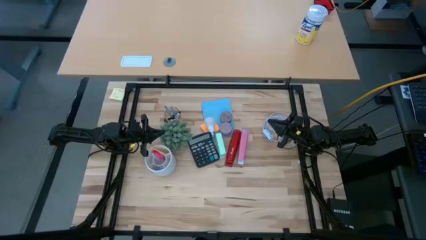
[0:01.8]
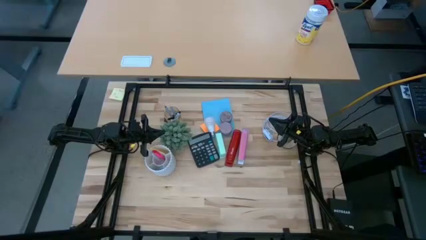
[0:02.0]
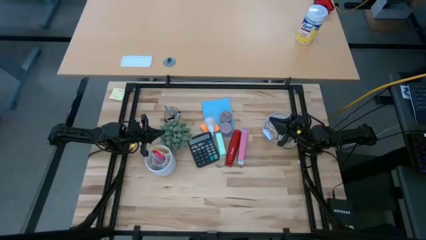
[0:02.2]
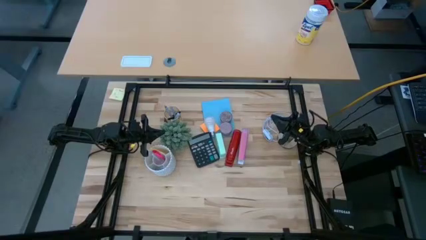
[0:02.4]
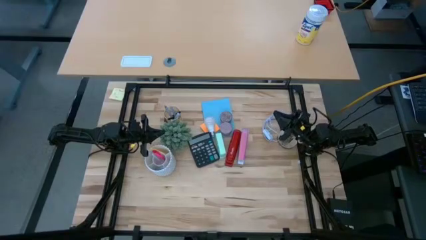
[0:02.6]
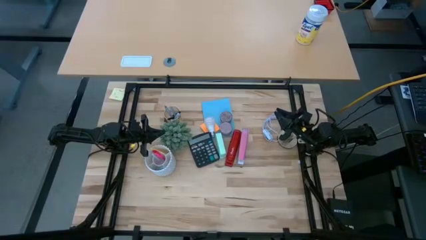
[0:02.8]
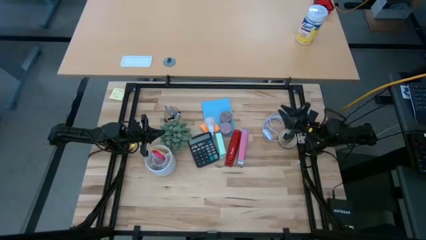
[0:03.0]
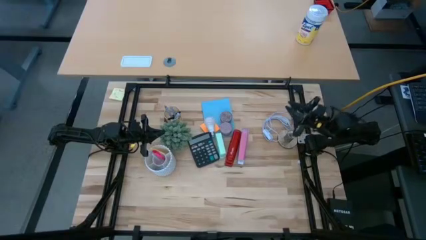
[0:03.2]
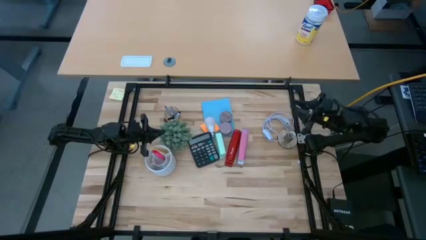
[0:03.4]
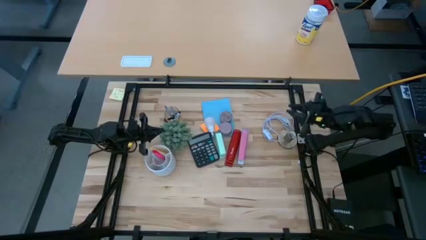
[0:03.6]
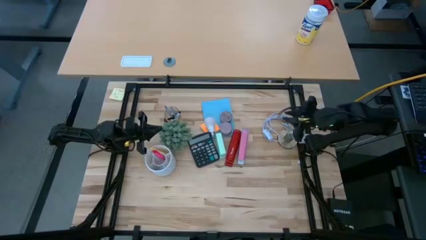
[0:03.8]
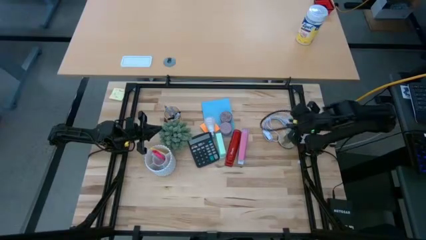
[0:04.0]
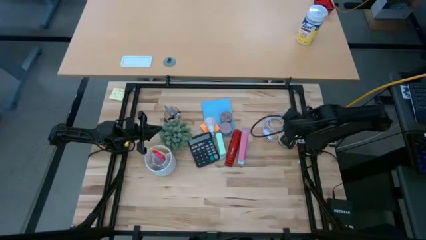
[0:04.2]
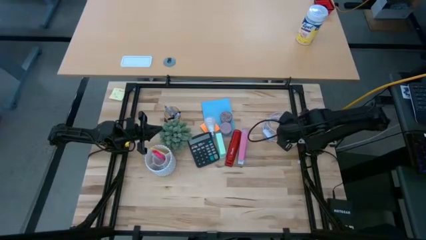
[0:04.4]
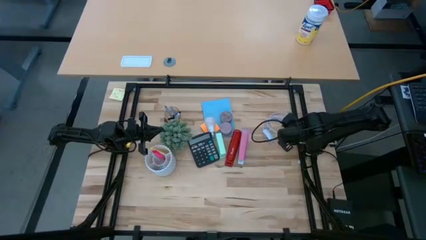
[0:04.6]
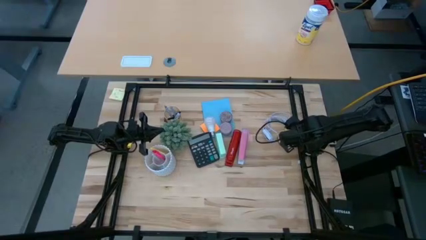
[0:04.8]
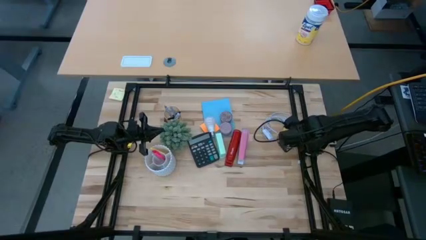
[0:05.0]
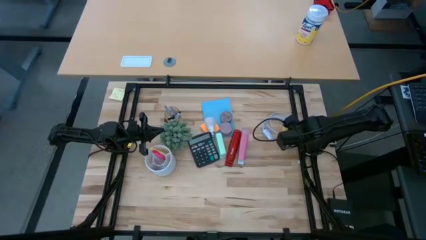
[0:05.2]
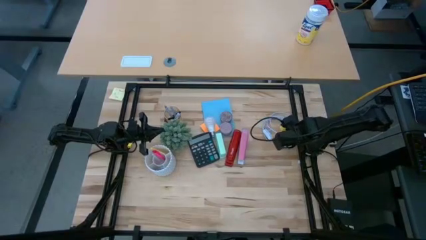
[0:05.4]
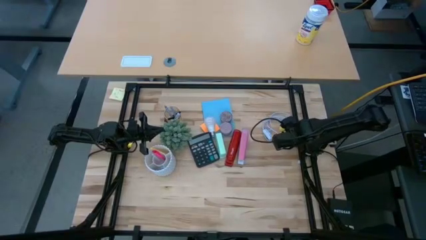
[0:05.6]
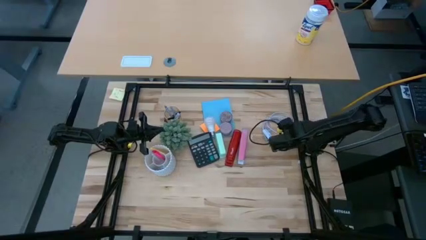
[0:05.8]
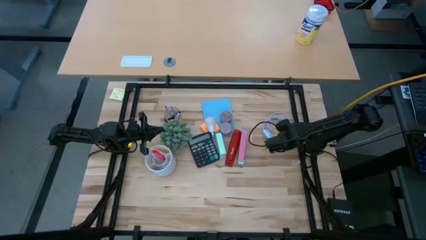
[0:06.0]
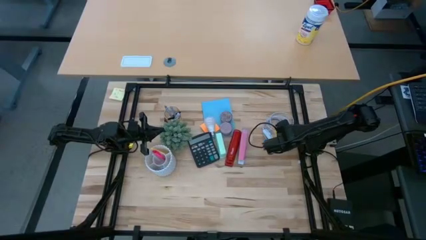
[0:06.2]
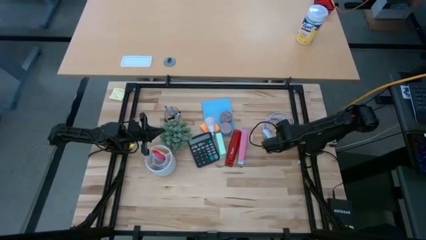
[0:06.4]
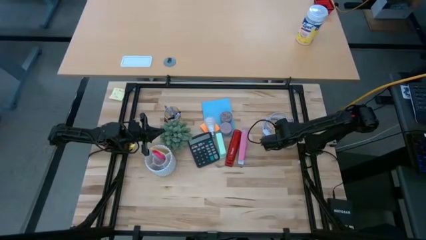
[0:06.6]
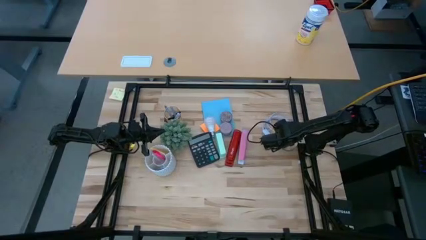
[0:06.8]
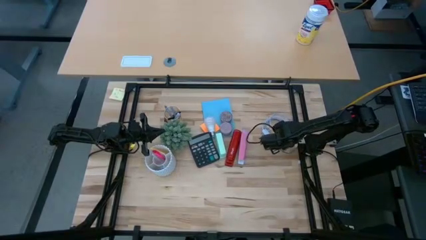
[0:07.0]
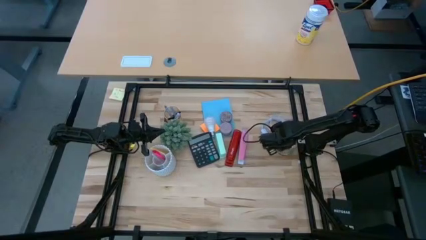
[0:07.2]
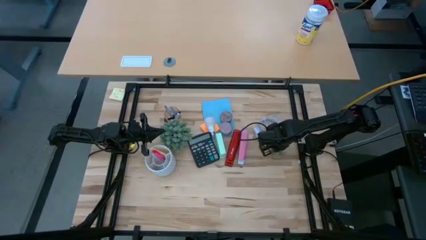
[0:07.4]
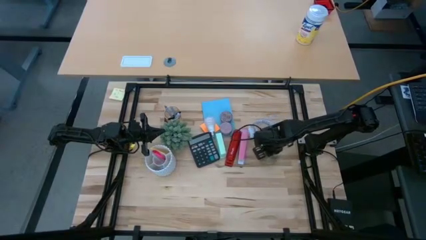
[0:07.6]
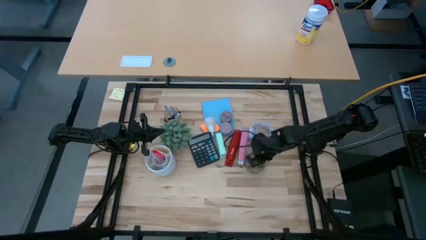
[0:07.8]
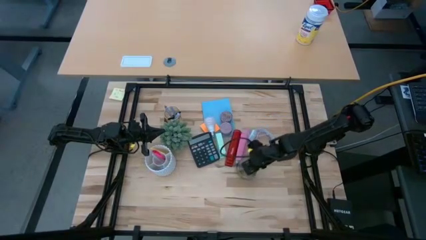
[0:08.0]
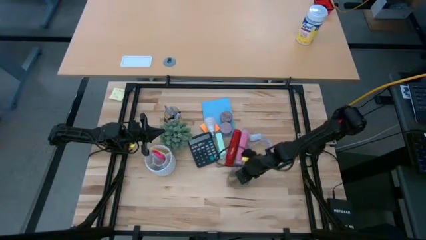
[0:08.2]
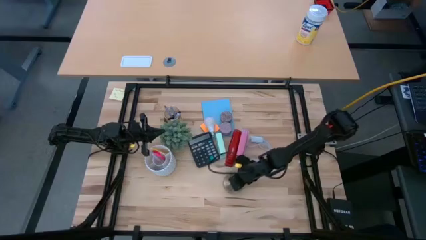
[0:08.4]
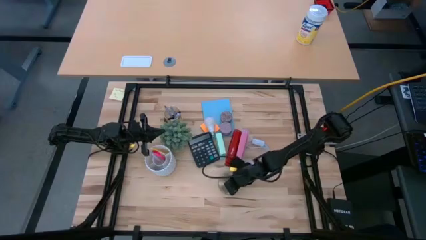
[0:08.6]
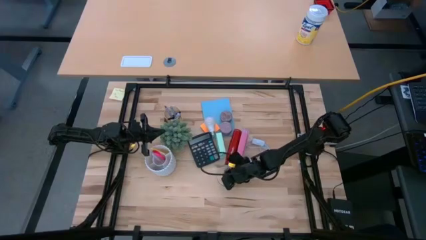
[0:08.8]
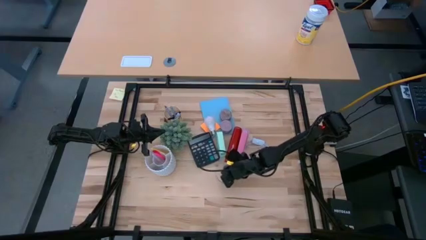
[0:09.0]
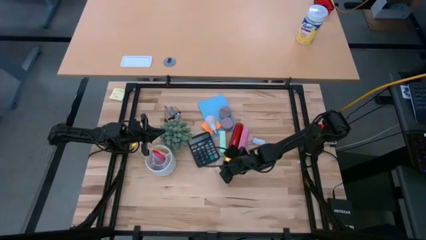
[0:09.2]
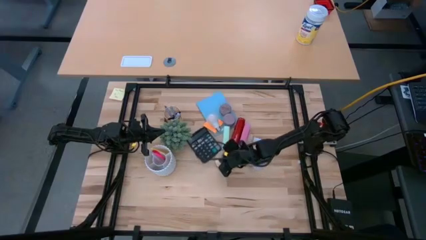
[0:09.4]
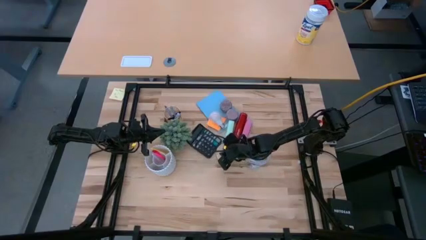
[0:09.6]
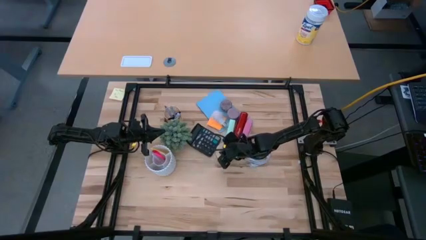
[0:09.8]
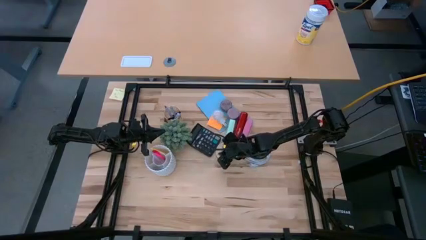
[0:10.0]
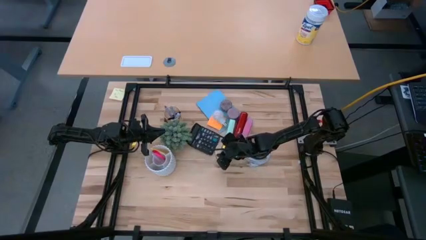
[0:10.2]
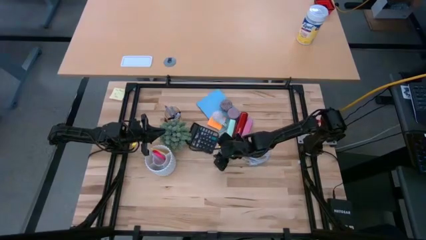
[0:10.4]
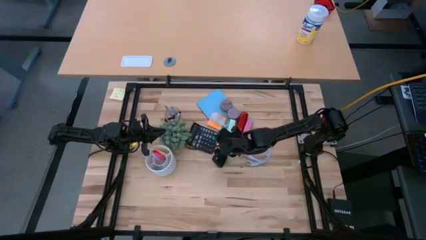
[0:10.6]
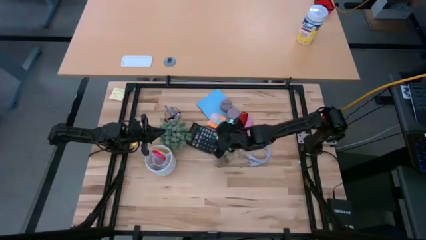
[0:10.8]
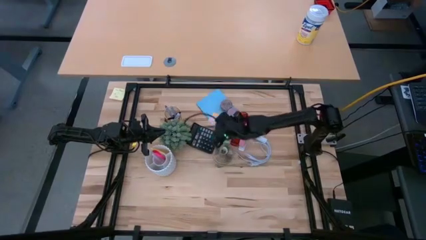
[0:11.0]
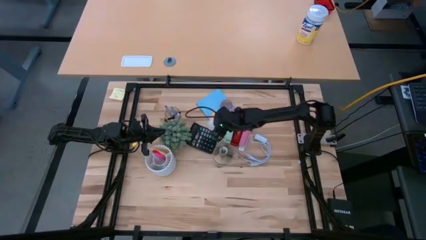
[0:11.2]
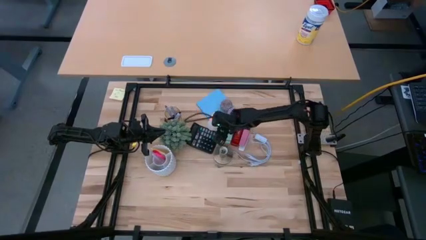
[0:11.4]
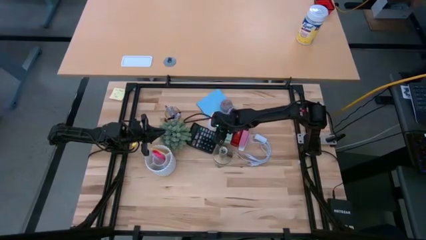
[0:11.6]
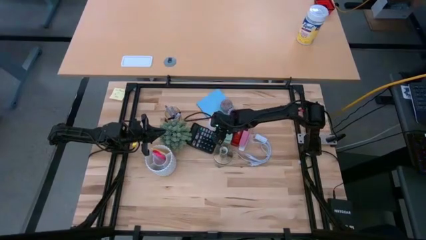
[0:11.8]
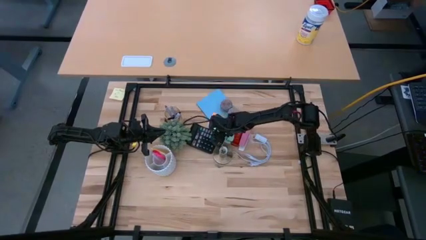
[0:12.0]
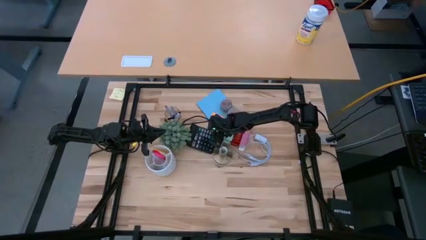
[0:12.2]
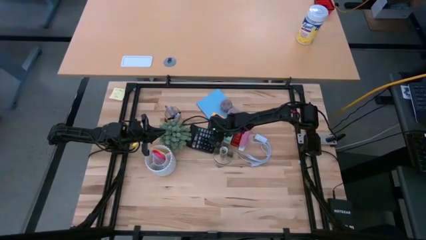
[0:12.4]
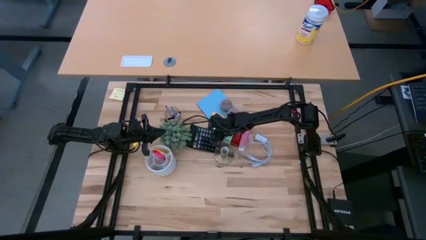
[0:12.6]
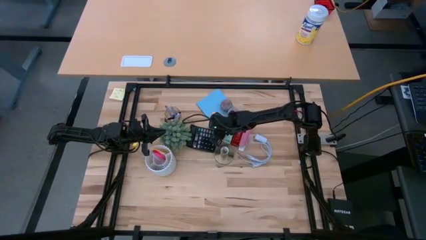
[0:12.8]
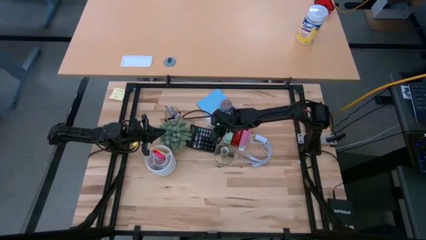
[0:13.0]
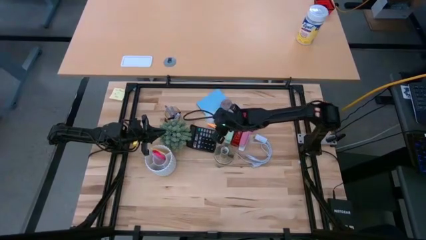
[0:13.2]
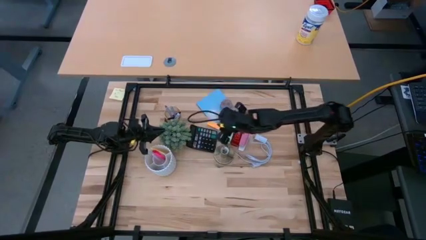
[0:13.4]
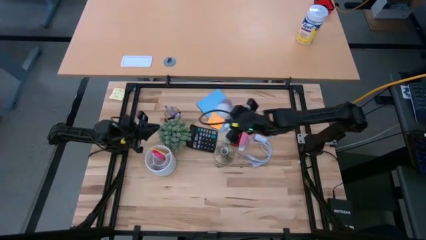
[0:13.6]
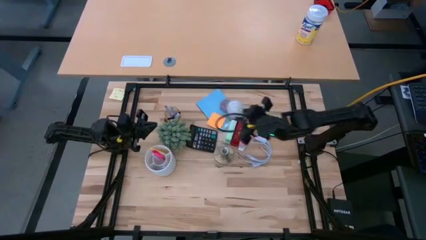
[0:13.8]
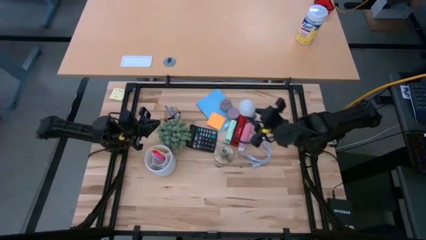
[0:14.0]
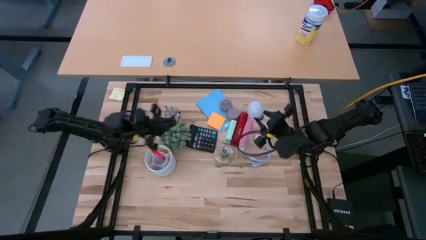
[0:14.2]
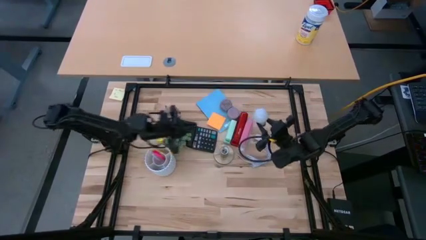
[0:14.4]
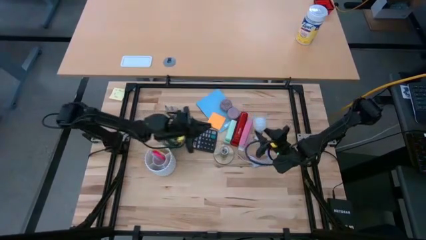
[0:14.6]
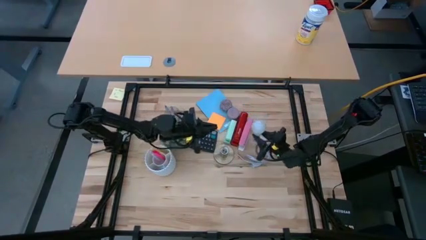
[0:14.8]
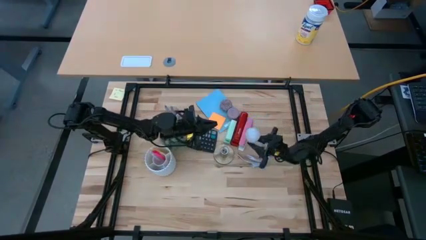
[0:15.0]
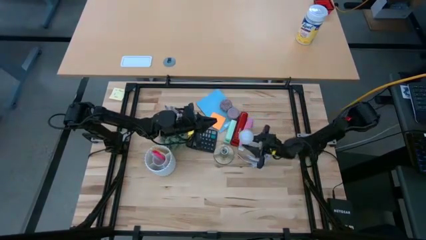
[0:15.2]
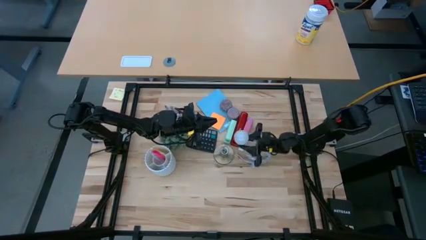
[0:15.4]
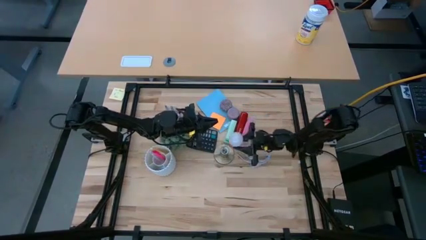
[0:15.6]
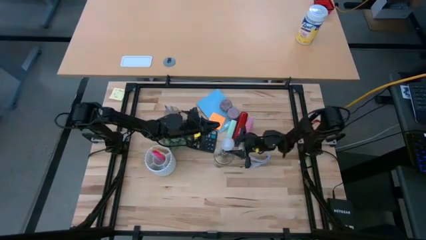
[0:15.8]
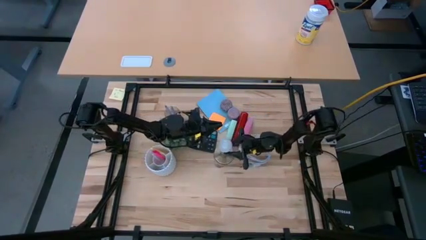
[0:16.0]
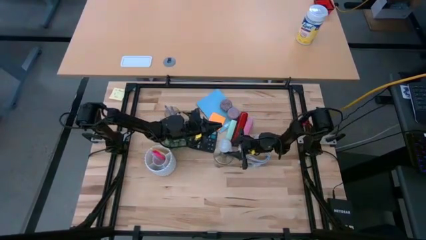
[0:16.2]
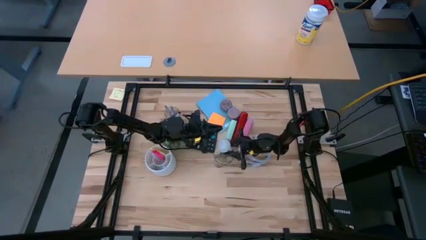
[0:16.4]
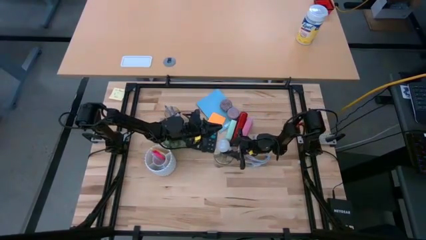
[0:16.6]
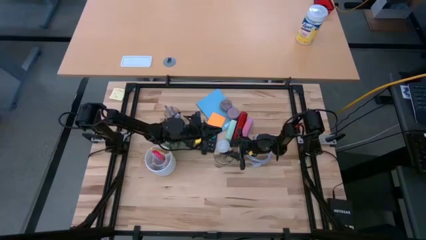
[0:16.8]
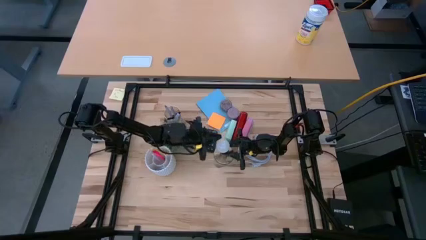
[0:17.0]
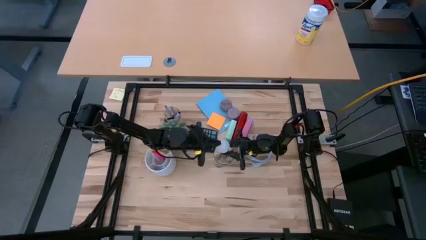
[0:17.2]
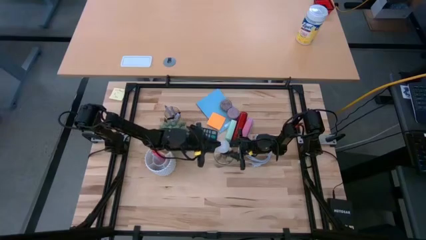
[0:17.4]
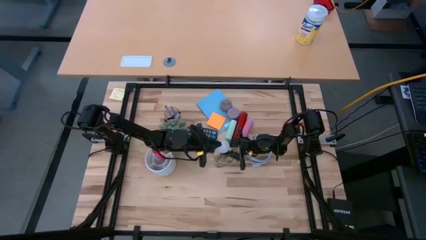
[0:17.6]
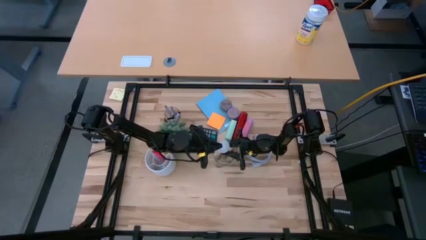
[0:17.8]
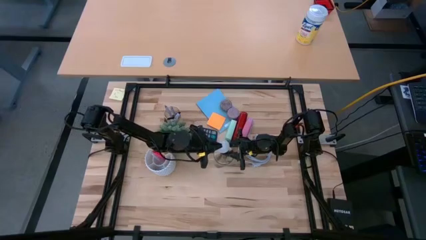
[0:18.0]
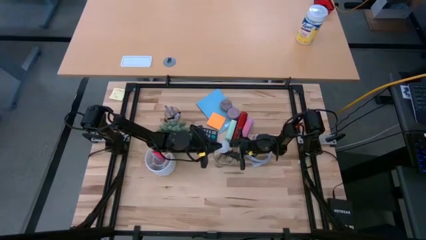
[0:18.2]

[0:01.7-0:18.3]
Task: Screw lightbulb
Insert the lightbulb into the lamp
